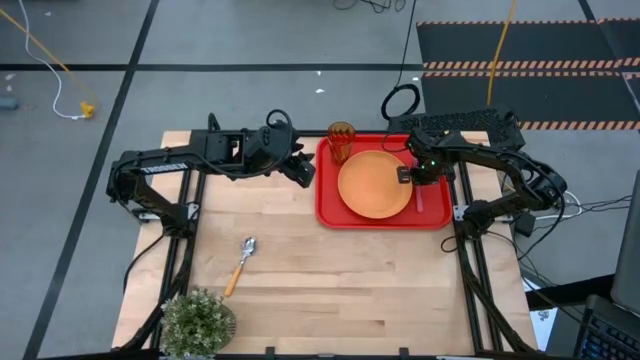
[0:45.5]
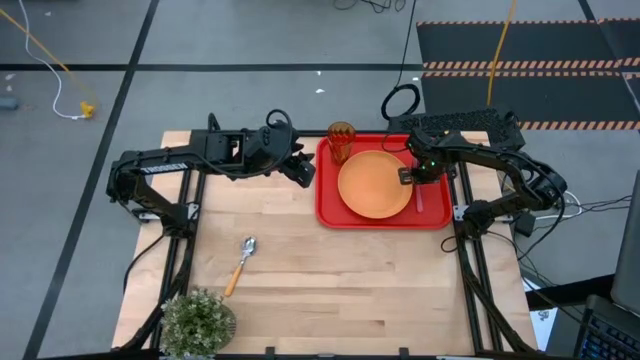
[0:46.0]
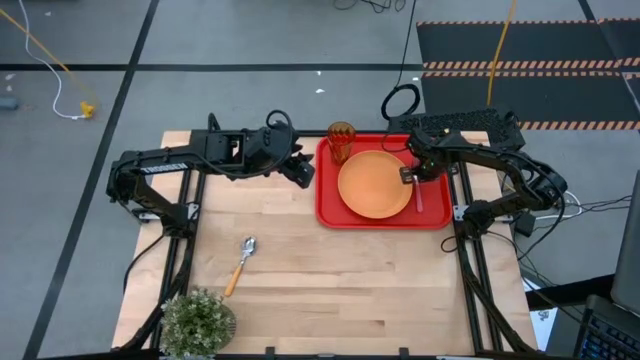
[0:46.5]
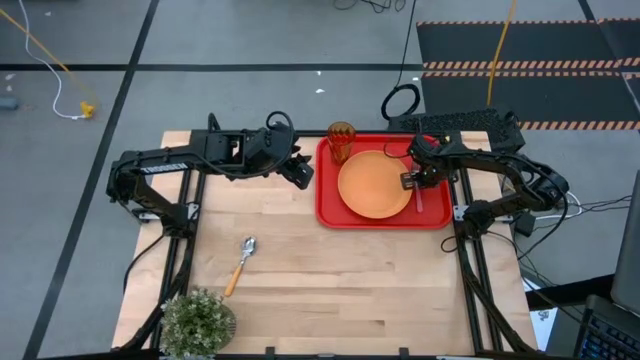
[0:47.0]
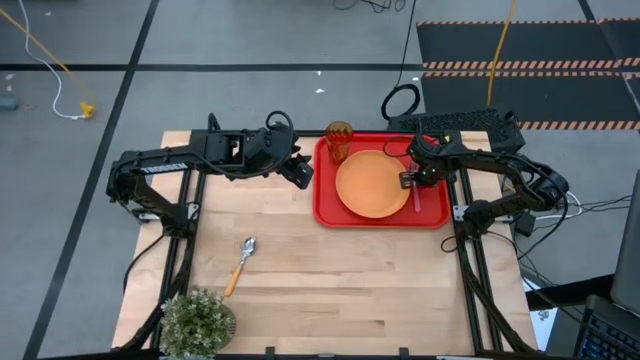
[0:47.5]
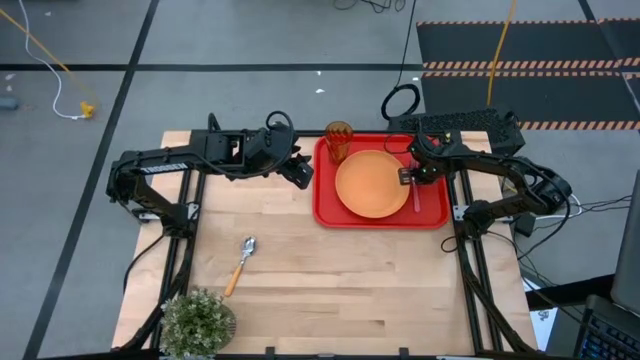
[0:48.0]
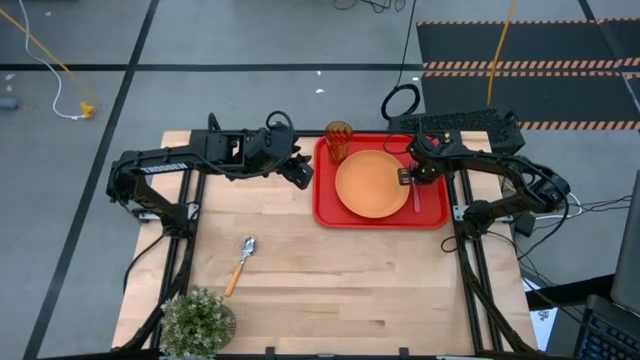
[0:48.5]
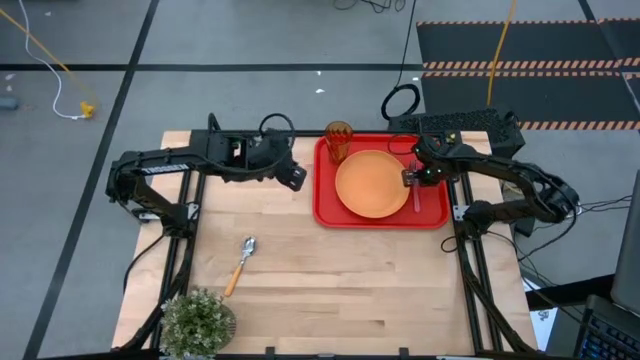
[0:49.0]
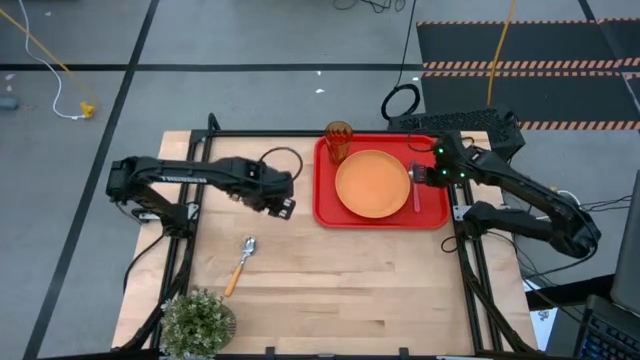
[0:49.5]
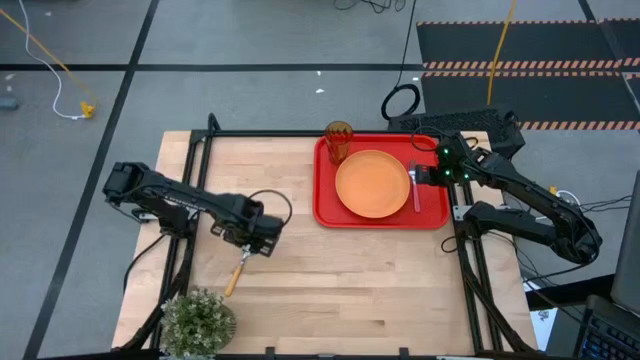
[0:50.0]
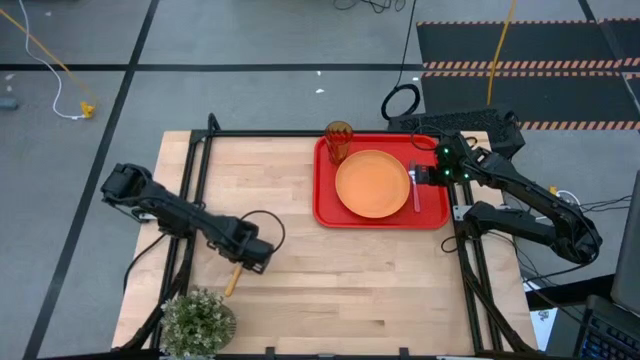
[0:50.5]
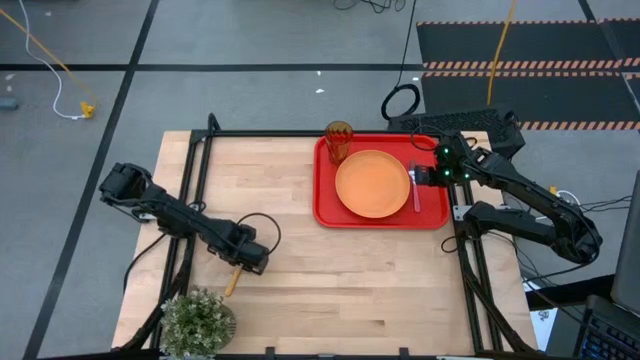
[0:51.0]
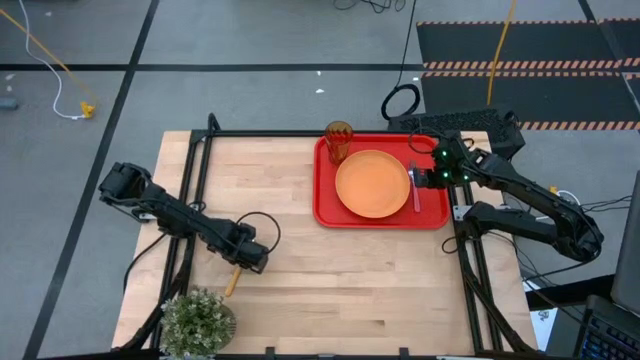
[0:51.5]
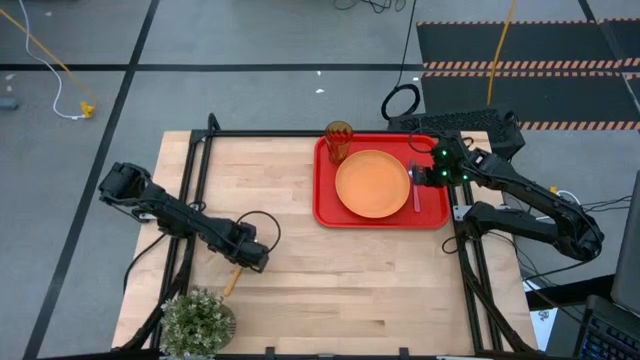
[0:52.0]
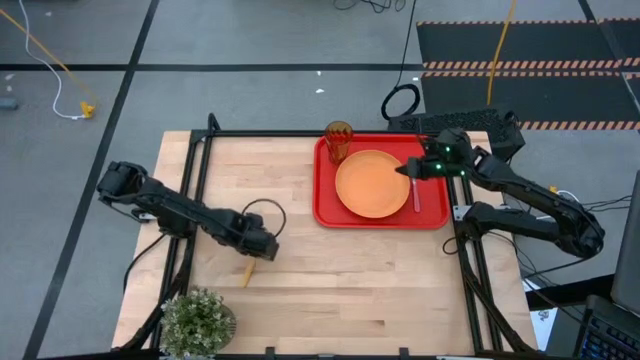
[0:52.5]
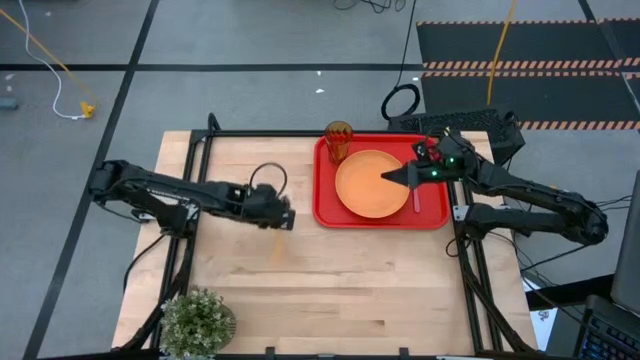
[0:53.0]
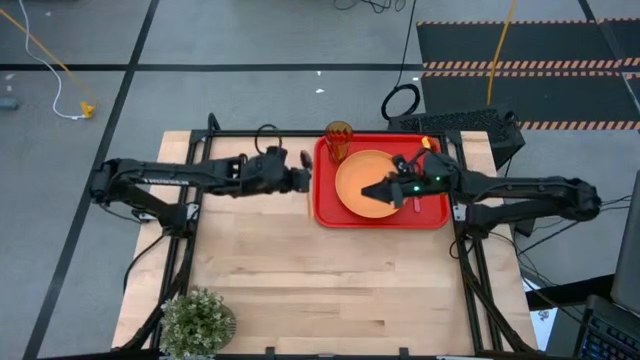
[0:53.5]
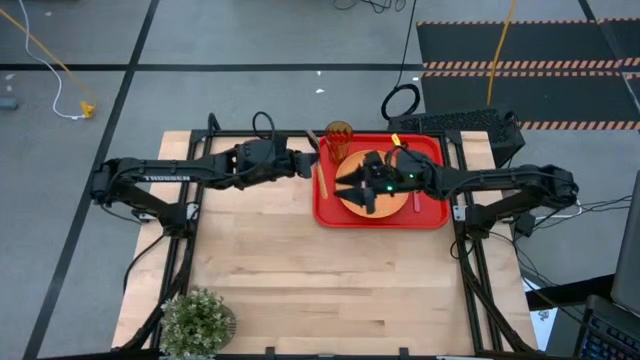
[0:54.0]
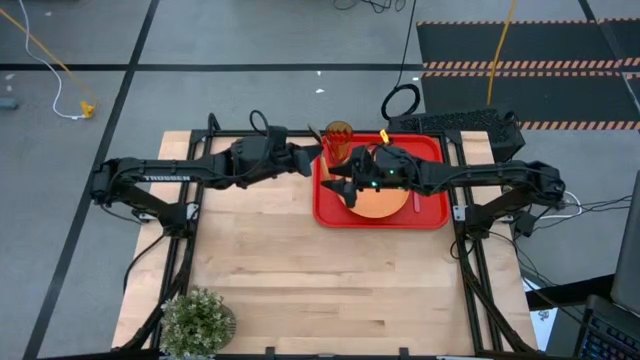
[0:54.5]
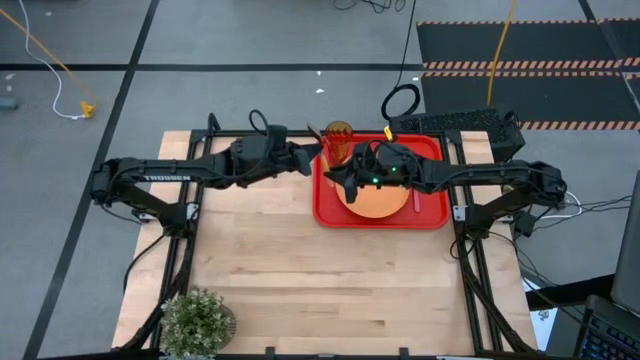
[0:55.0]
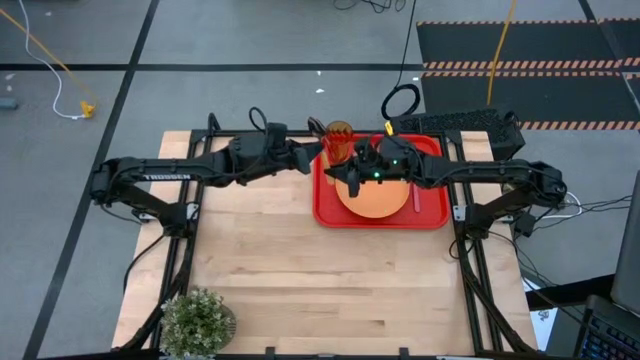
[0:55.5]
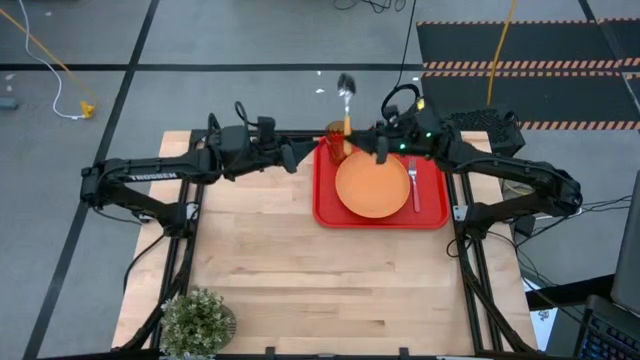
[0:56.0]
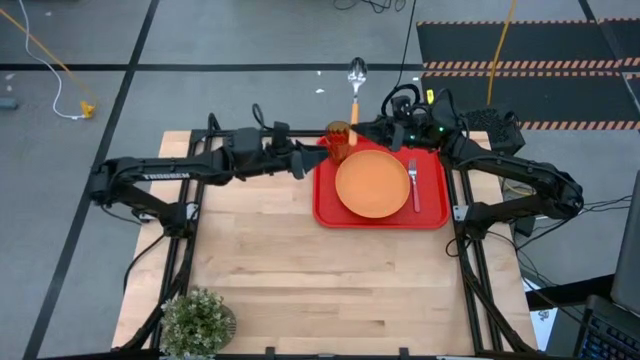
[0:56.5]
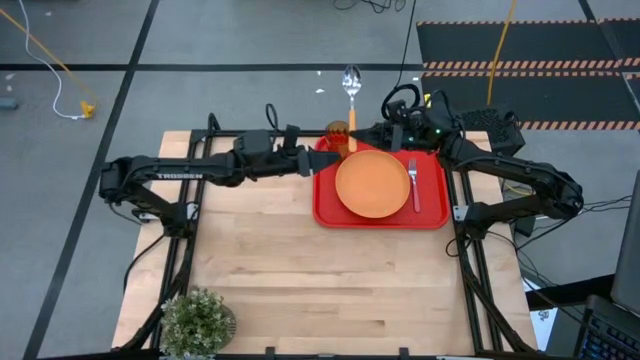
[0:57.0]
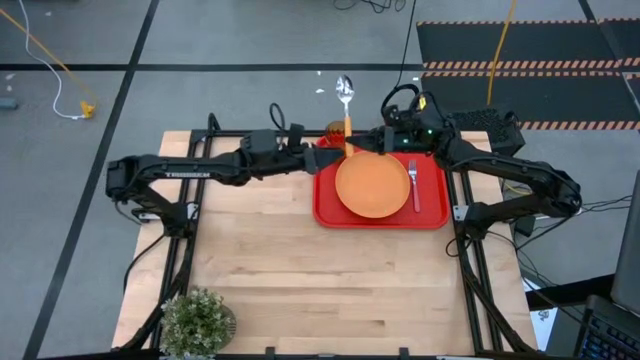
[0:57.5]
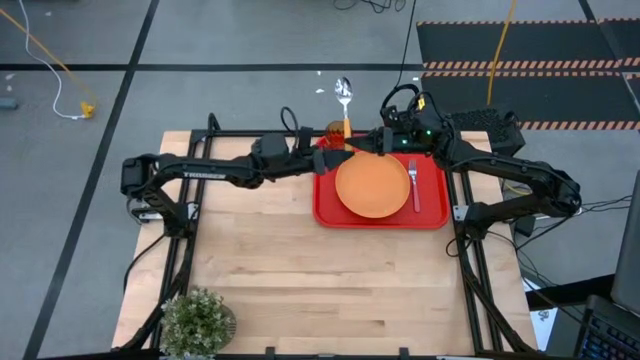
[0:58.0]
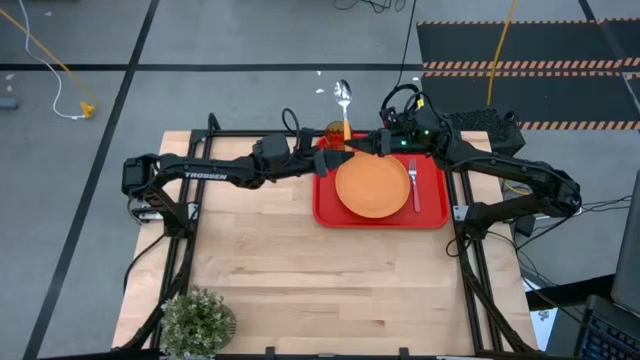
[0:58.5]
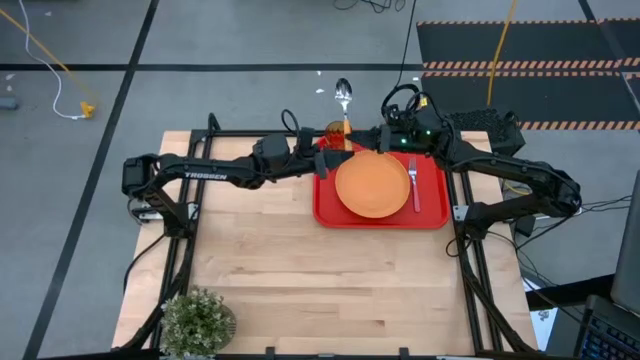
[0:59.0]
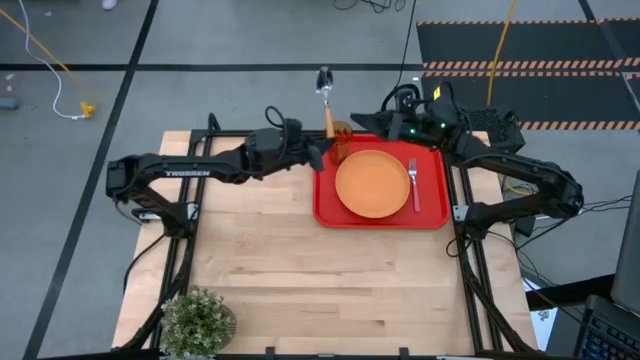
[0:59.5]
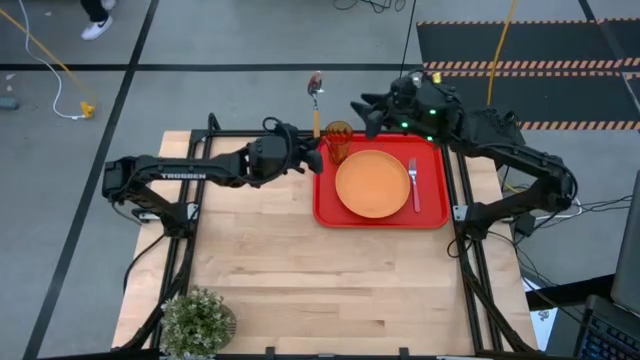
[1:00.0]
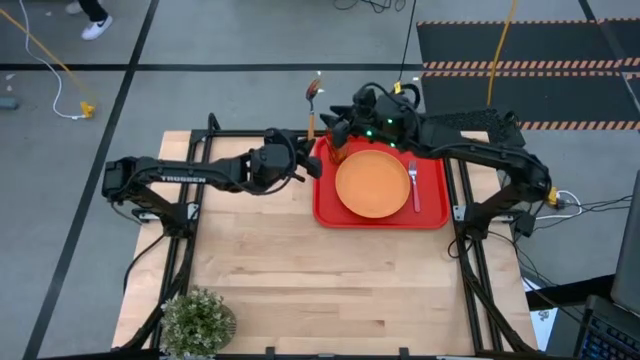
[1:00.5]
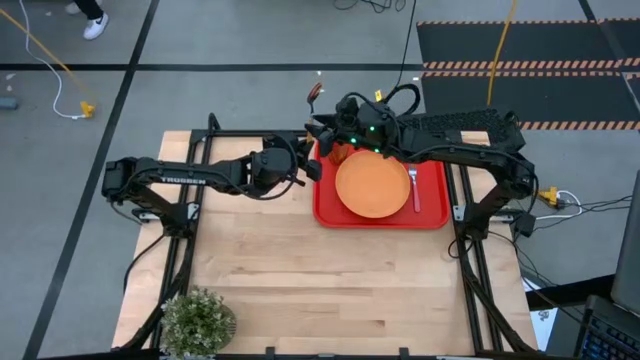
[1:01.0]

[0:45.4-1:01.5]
Task: Pick and place plate/cup/fork/spoon on tray
Put the yellow spoon on the red tray to the right side of the pink fork

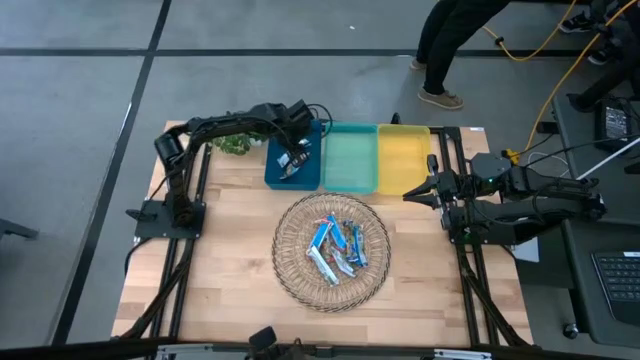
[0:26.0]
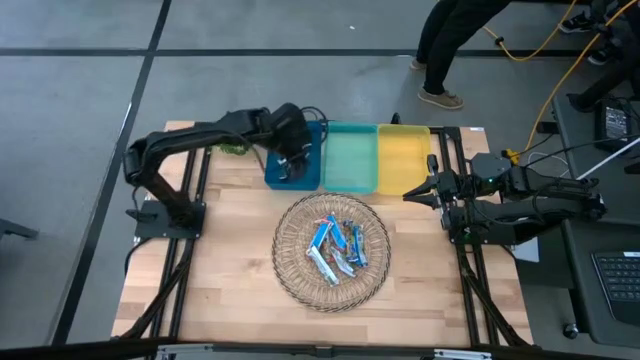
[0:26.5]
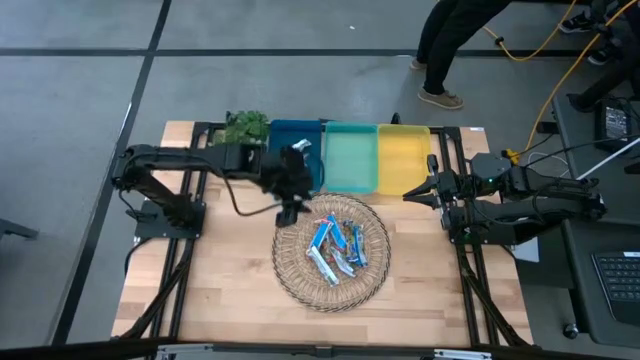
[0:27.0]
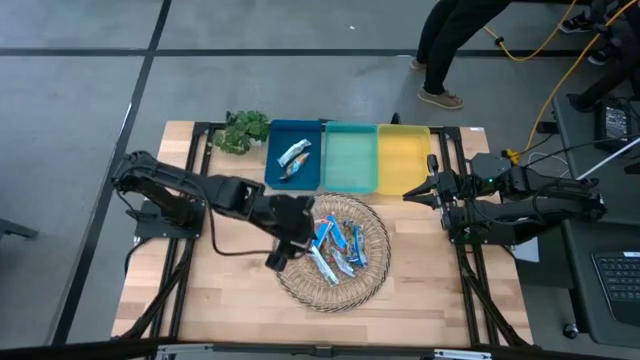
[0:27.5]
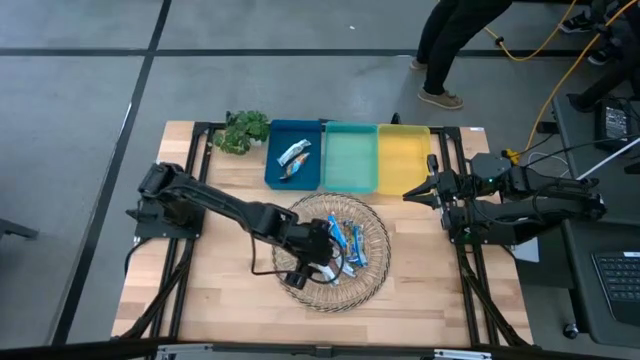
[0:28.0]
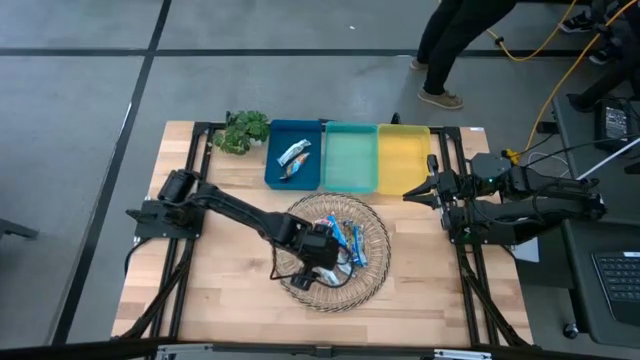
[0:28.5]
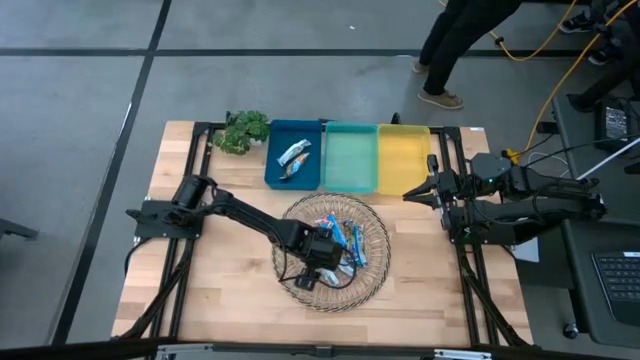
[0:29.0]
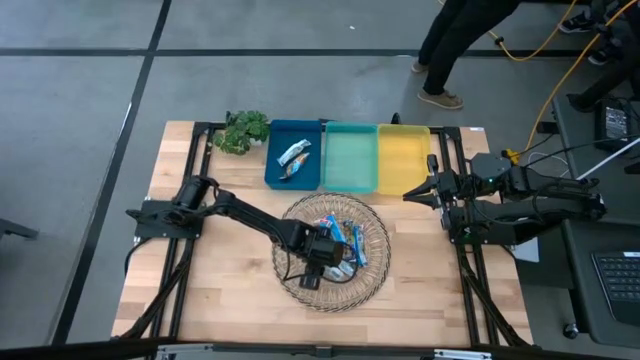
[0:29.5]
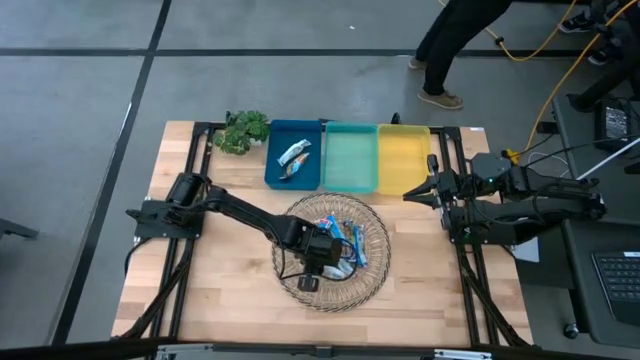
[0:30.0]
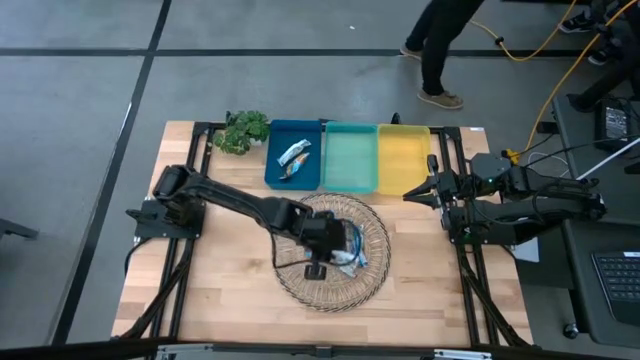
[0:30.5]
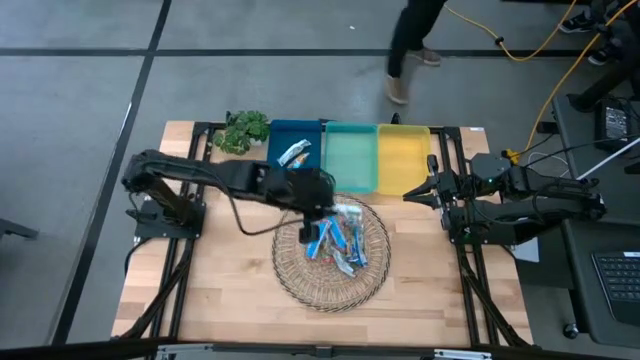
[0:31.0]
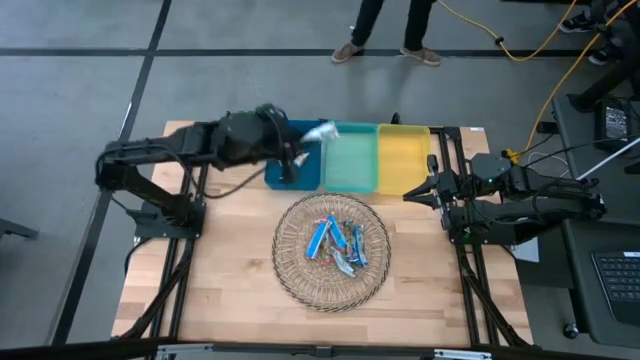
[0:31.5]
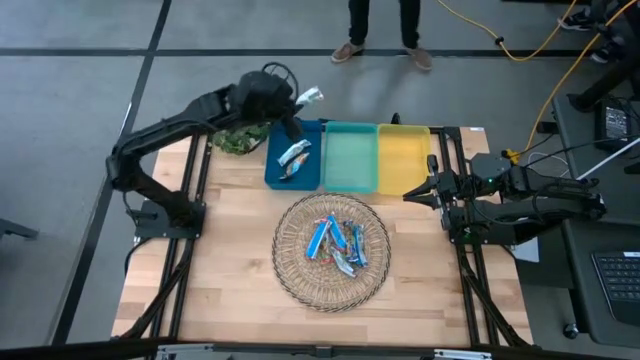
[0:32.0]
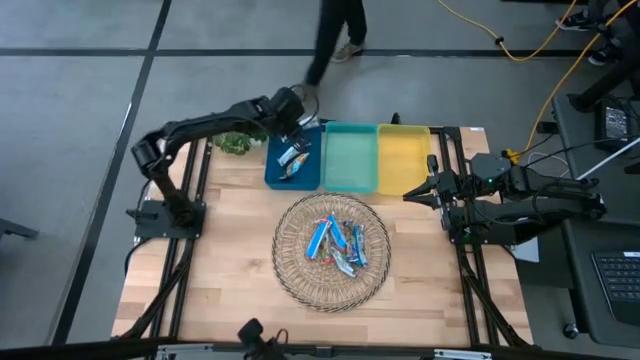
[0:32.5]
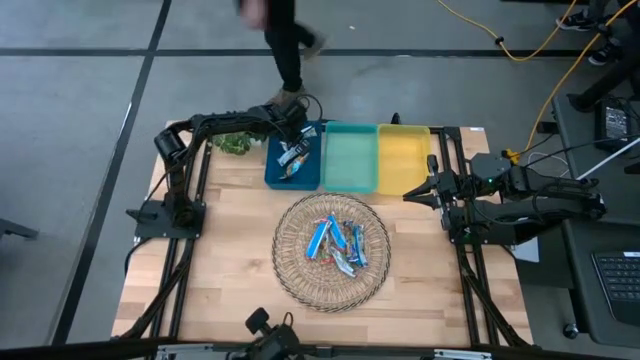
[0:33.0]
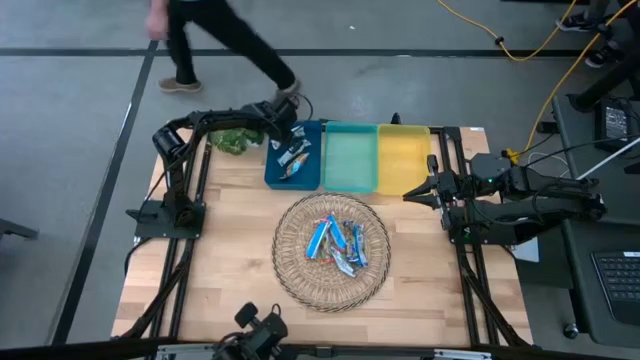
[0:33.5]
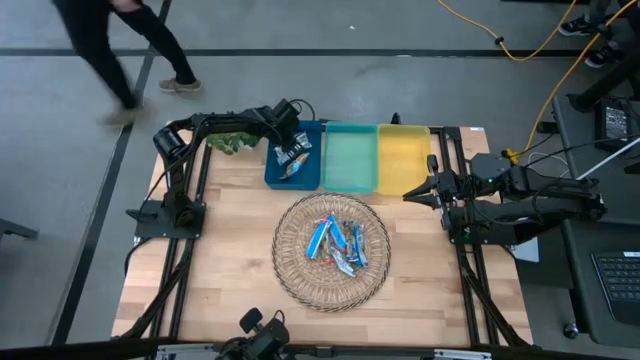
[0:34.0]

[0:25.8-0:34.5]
Task: Pick and place Granola Bars by type
Put the yellow granola bar into the blue bin
